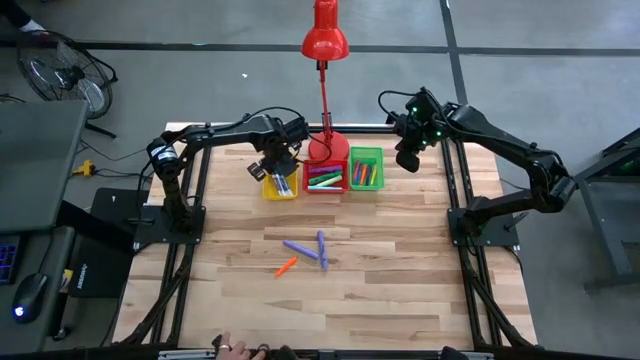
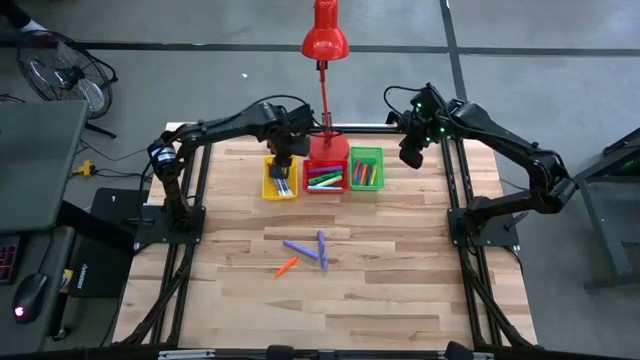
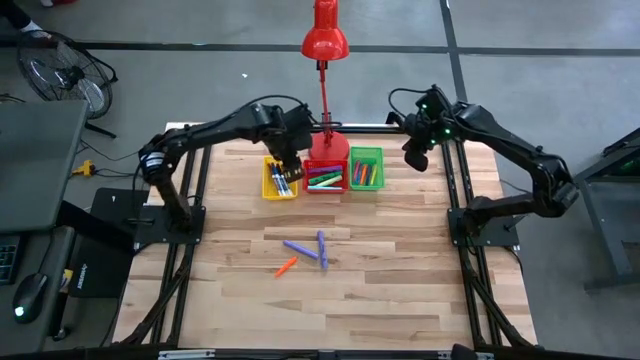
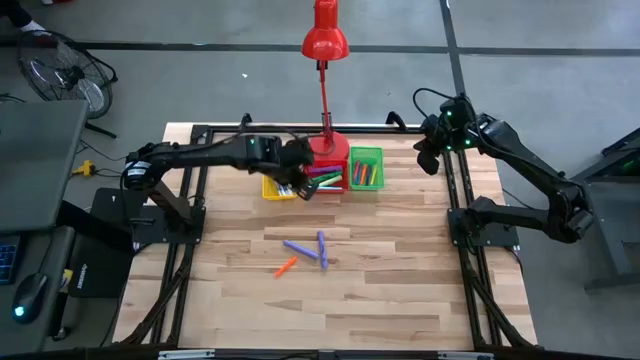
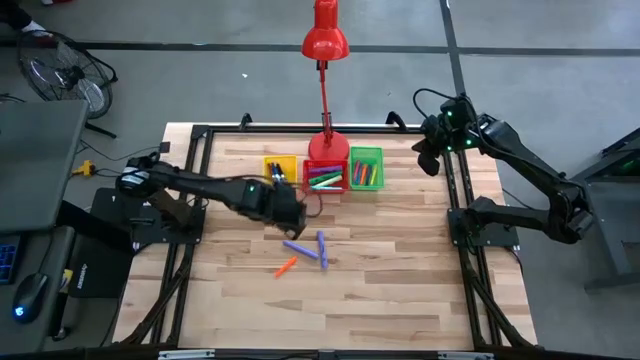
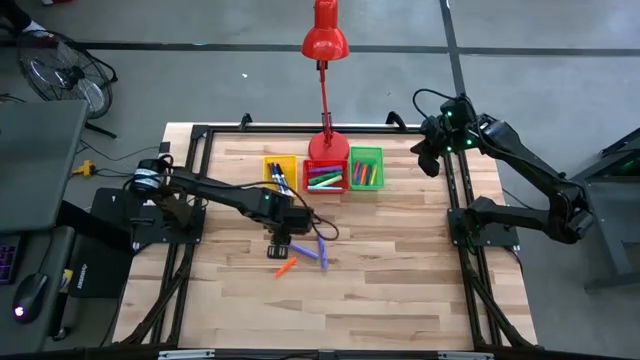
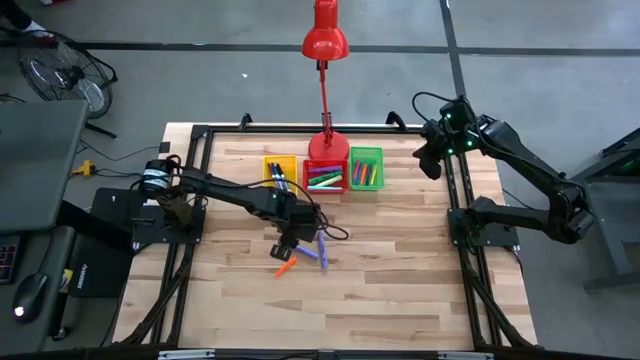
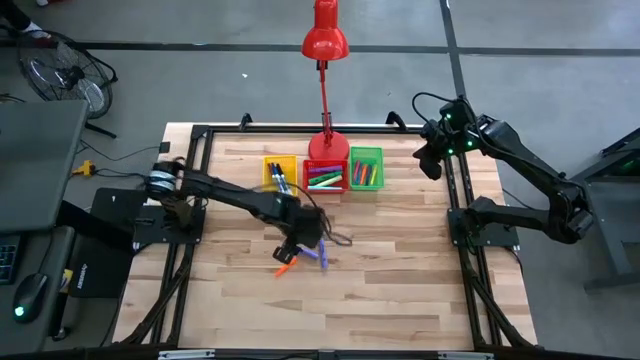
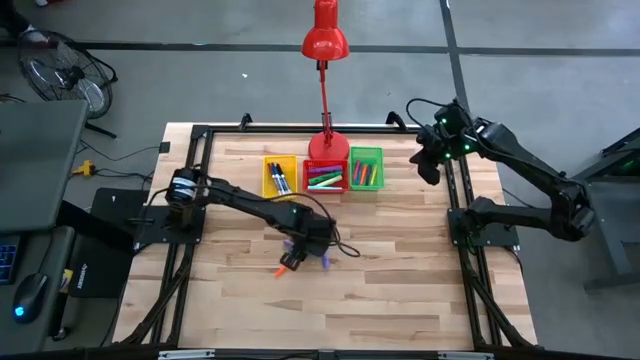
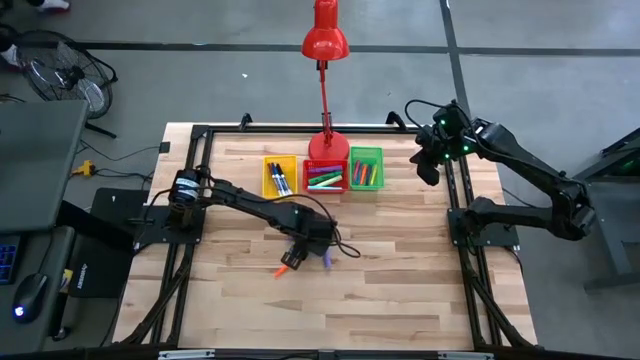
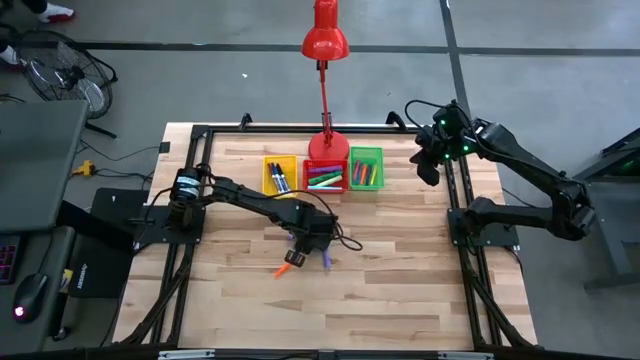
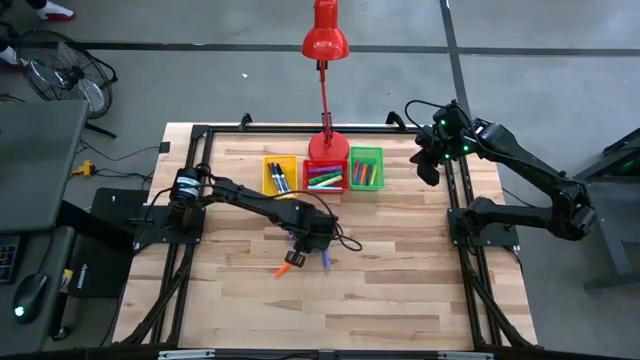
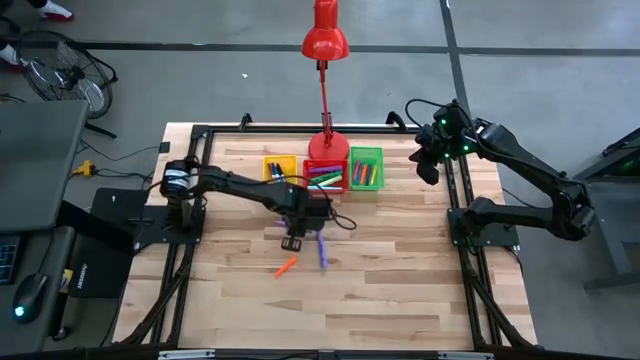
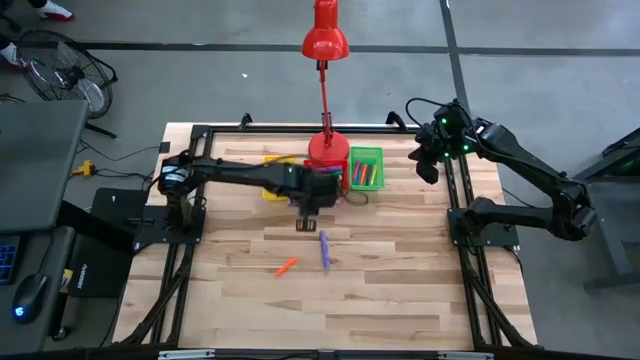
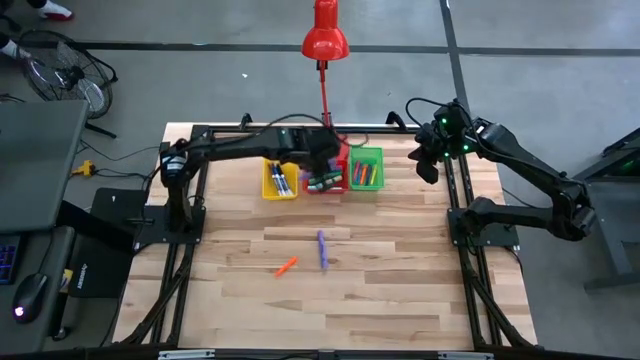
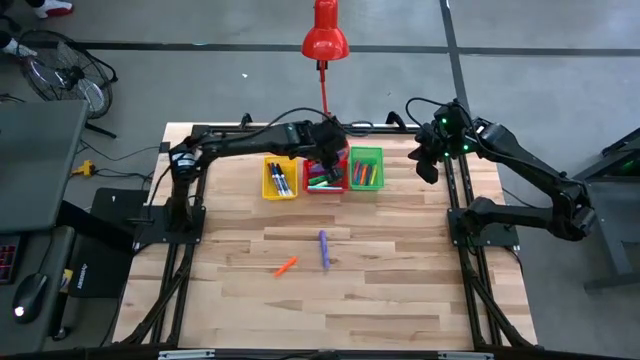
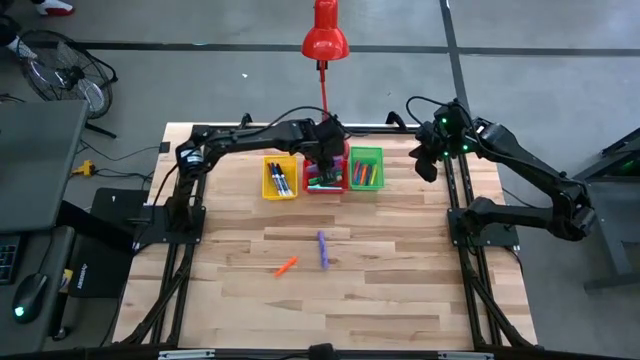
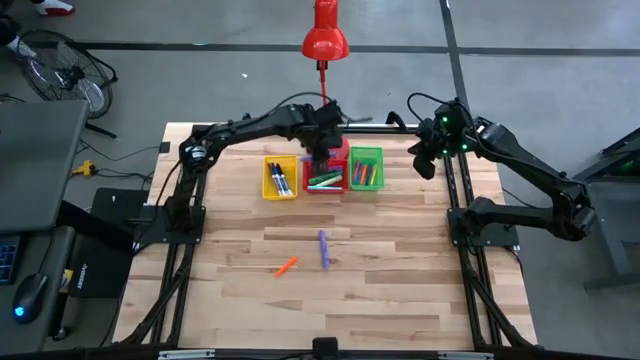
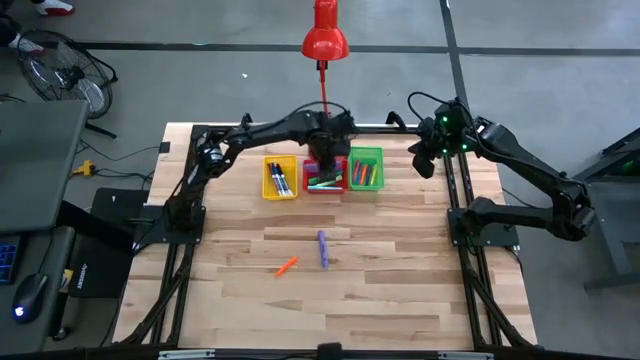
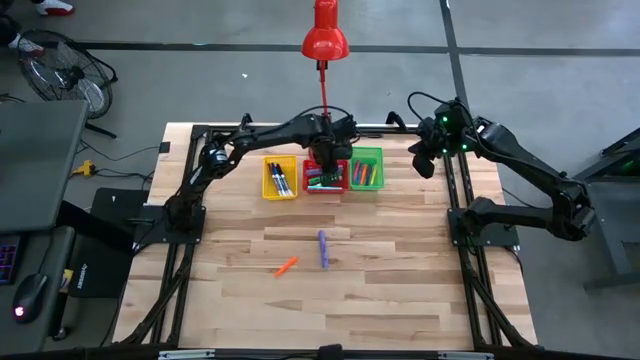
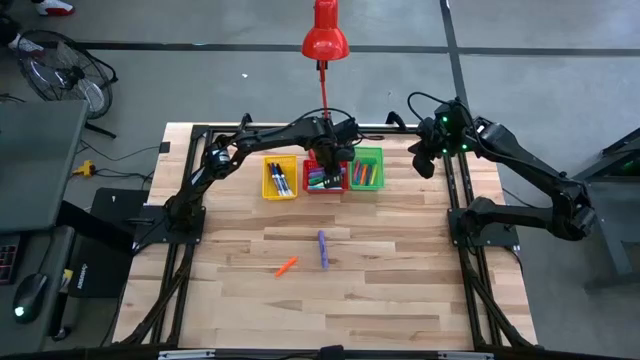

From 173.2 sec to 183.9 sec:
Task: Pick & Place Markers
Put the left light violet highlighter pen into the red bin

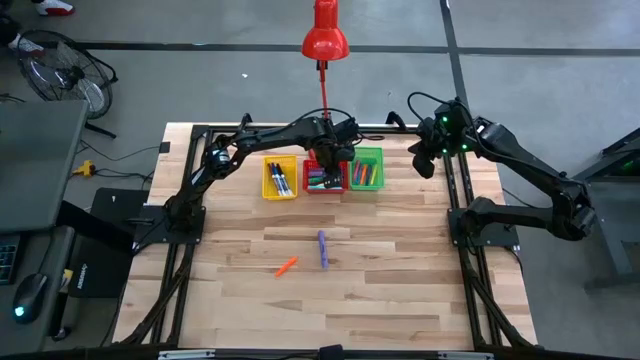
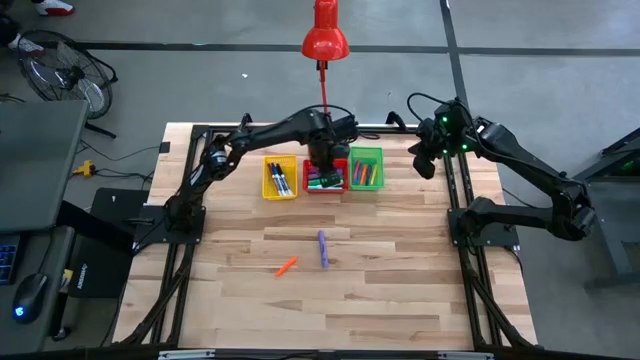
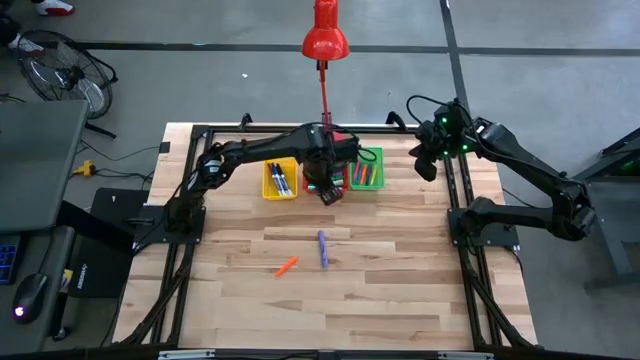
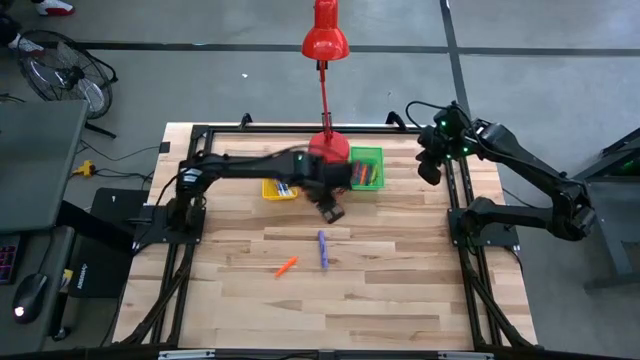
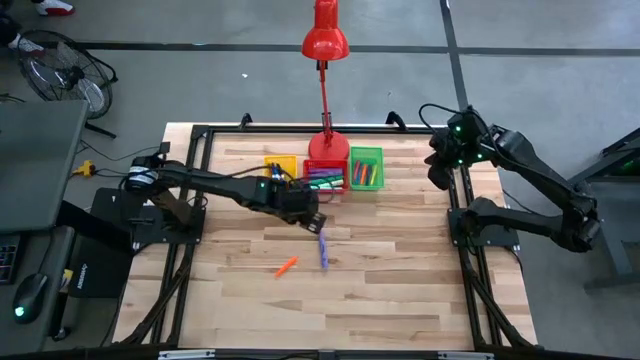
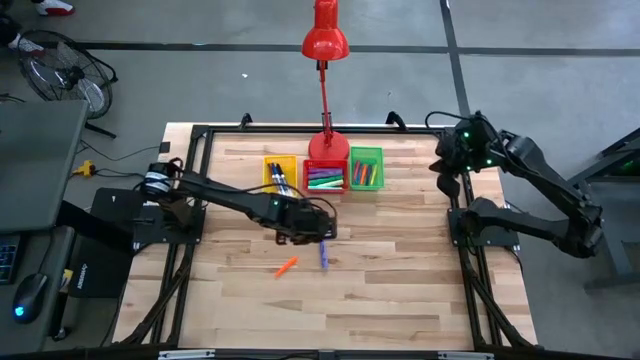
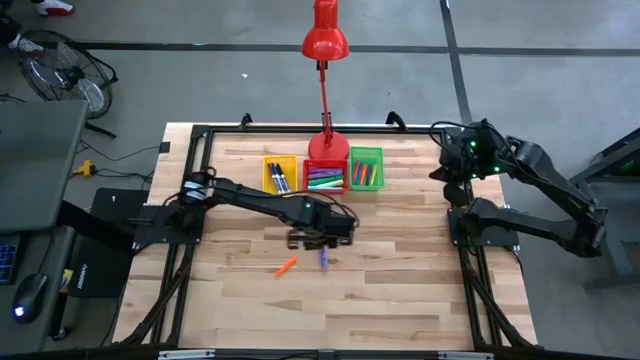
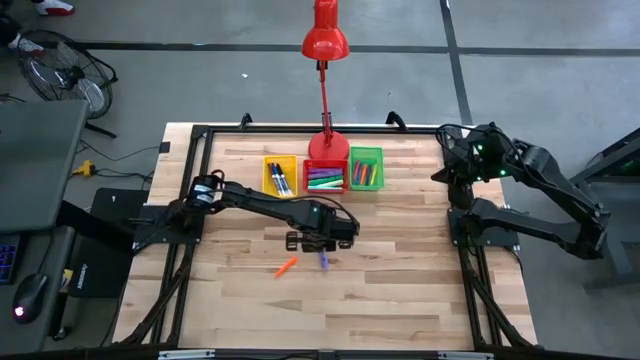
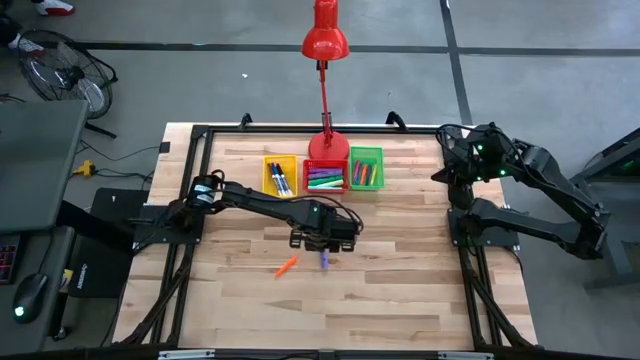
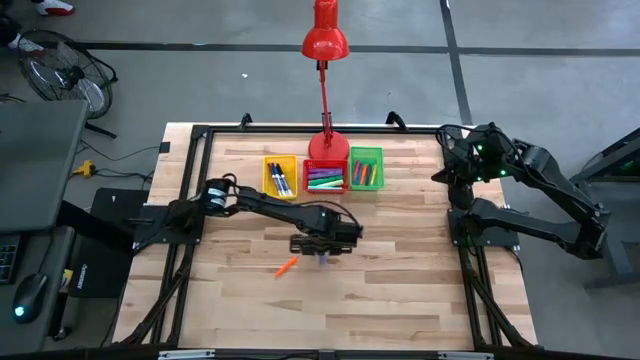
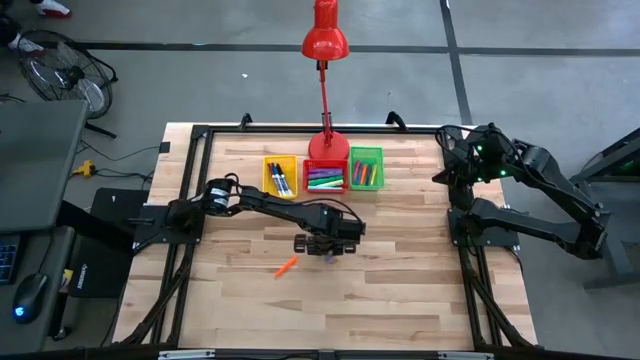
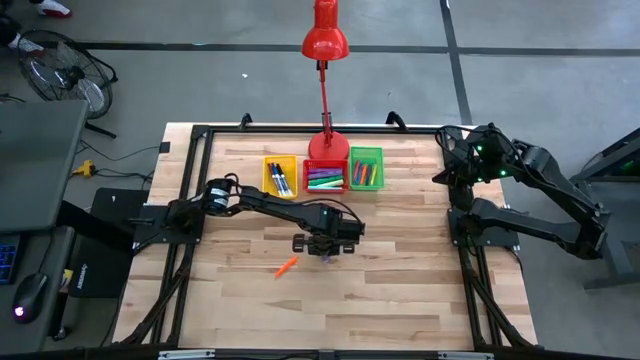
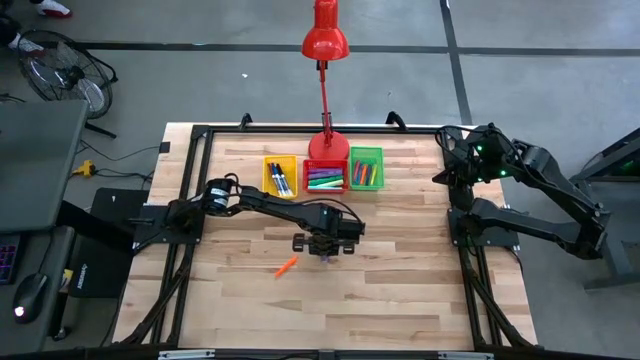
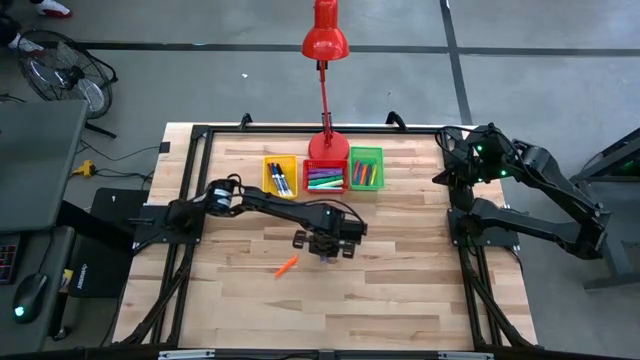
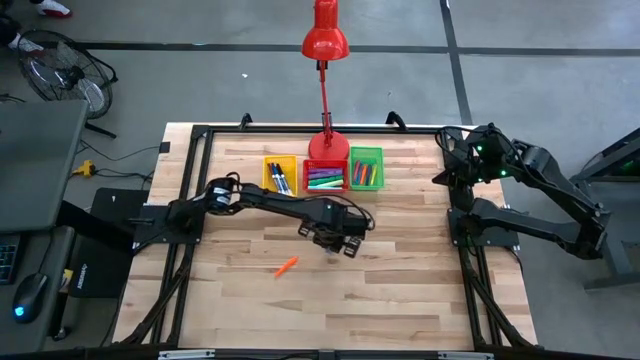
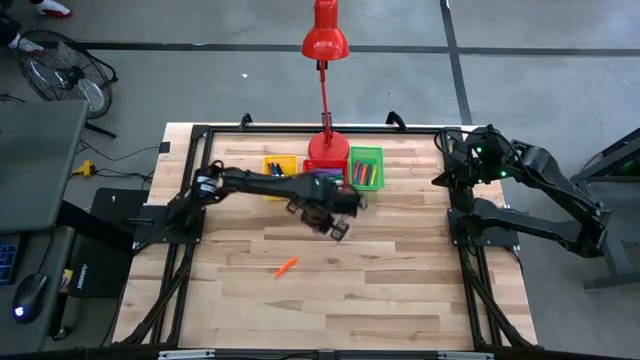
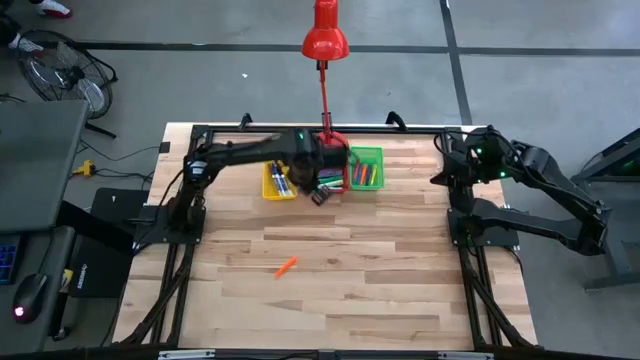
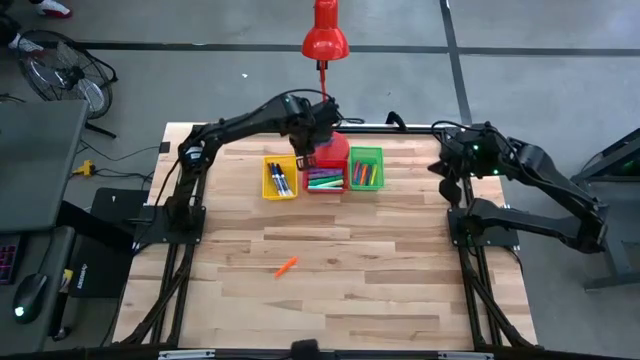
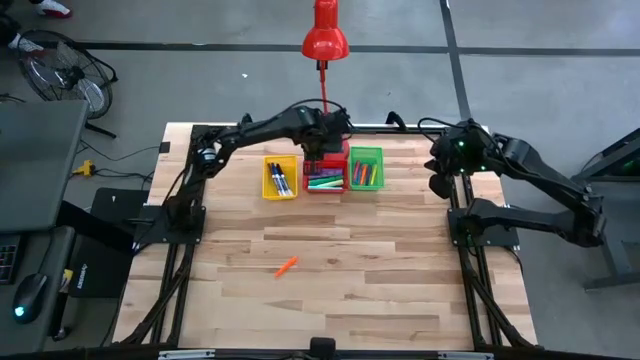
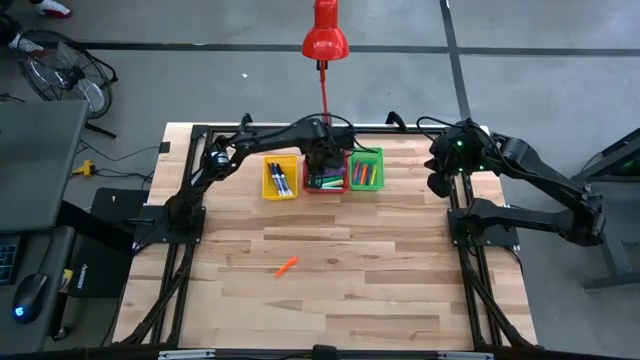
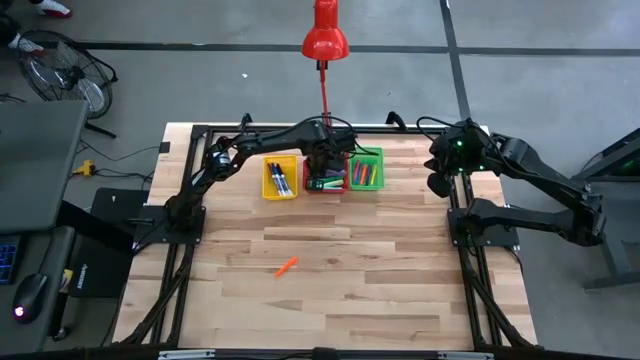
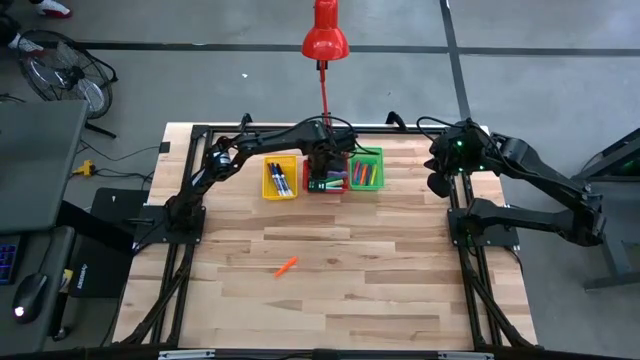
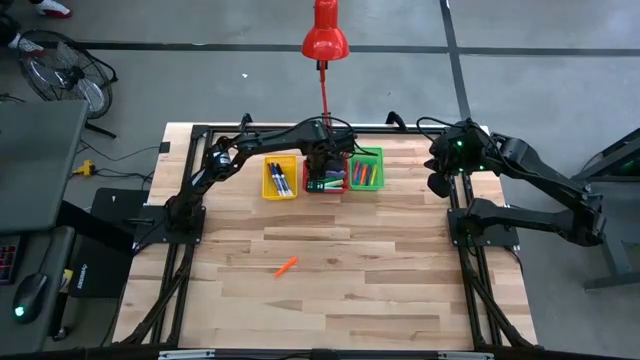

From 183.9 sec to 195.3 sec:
Put the light violet highlighter pen into the red bin
